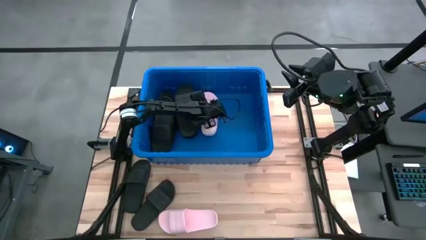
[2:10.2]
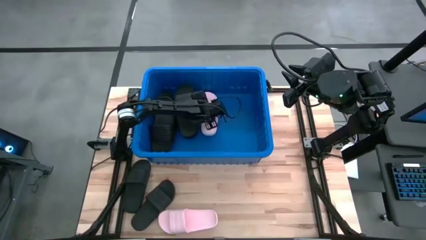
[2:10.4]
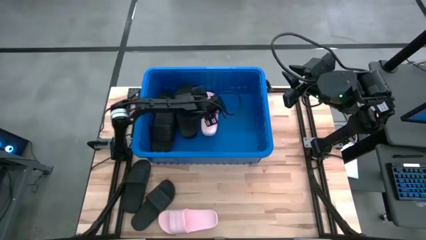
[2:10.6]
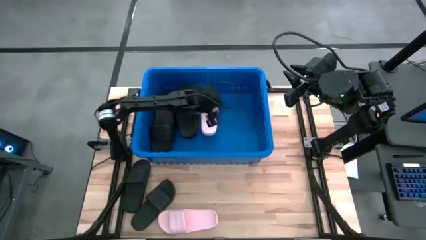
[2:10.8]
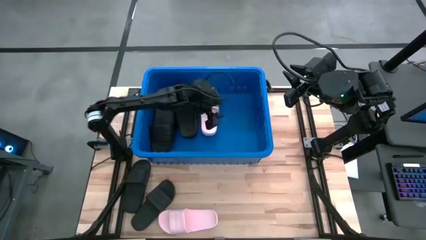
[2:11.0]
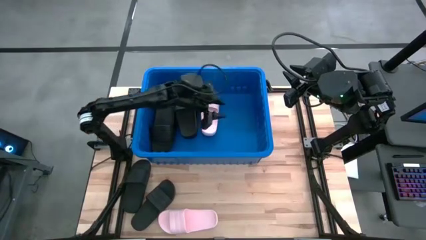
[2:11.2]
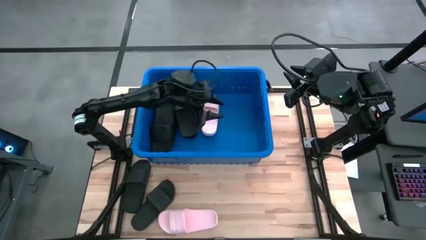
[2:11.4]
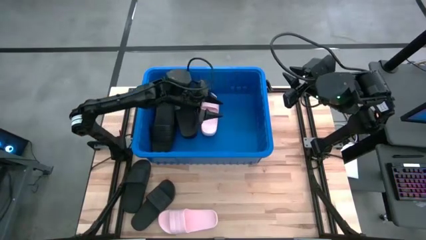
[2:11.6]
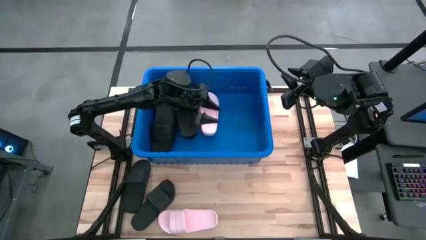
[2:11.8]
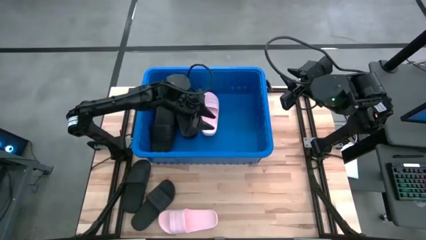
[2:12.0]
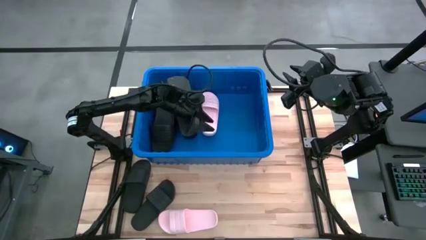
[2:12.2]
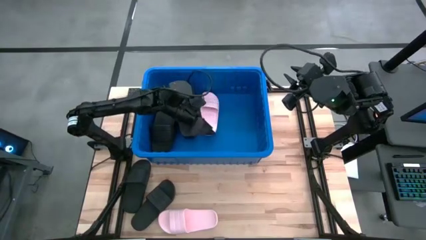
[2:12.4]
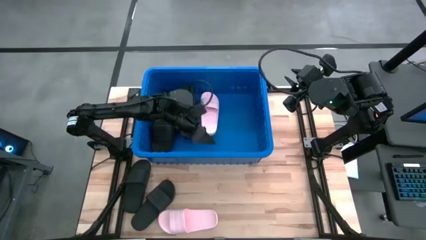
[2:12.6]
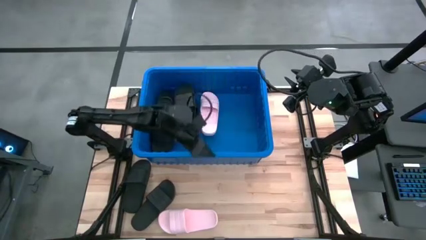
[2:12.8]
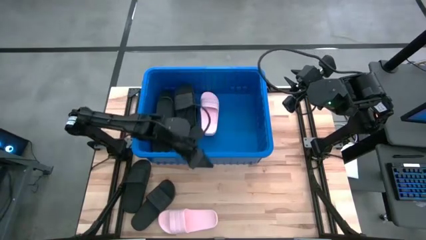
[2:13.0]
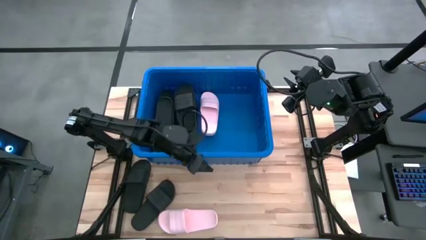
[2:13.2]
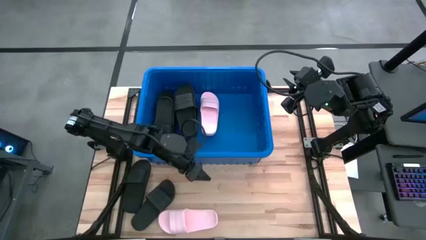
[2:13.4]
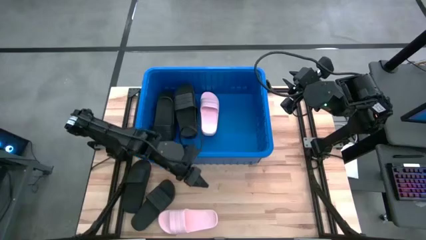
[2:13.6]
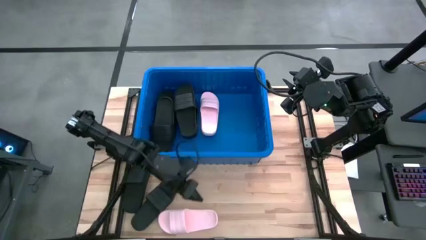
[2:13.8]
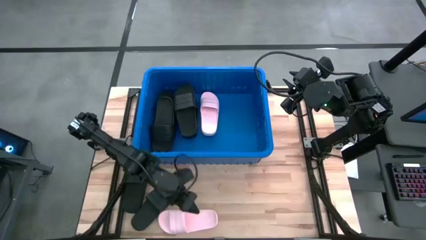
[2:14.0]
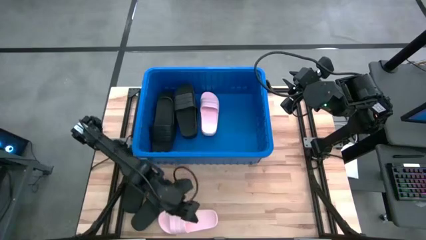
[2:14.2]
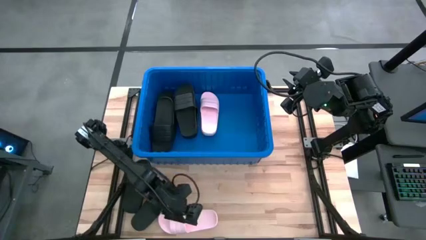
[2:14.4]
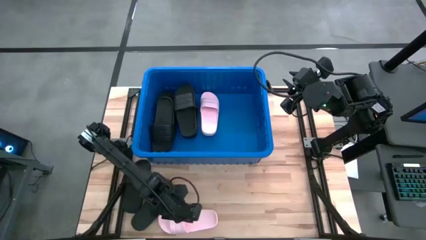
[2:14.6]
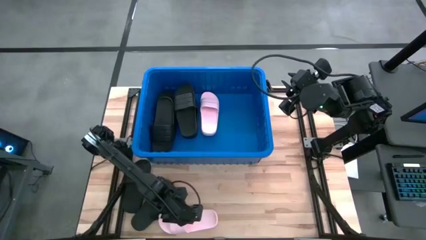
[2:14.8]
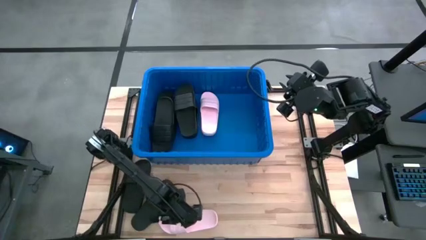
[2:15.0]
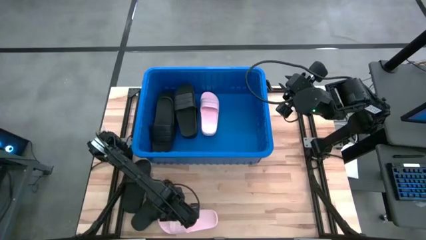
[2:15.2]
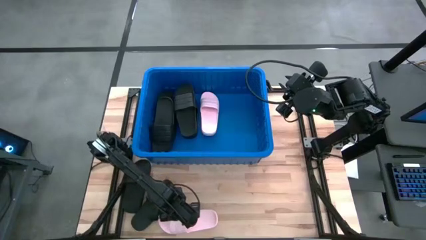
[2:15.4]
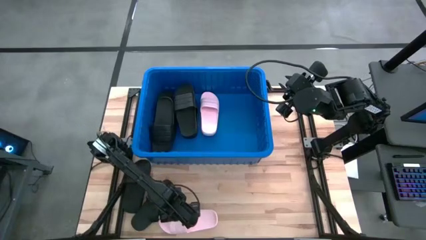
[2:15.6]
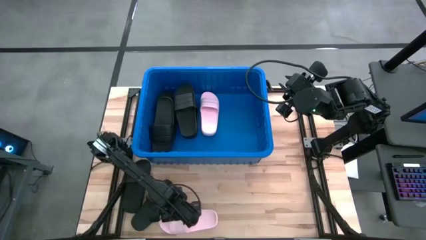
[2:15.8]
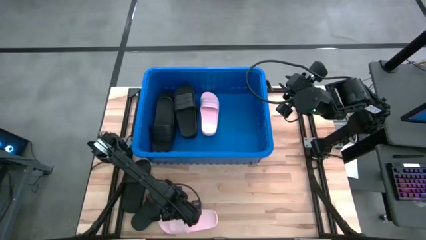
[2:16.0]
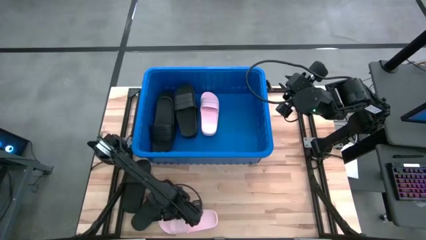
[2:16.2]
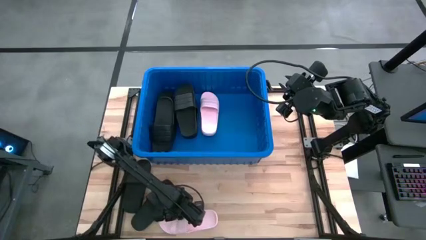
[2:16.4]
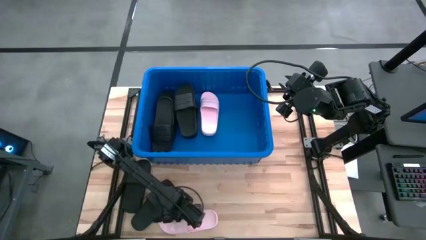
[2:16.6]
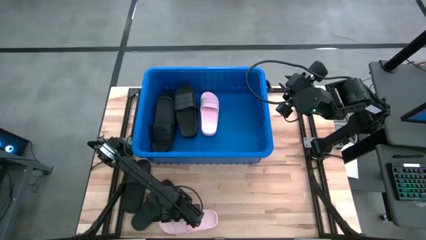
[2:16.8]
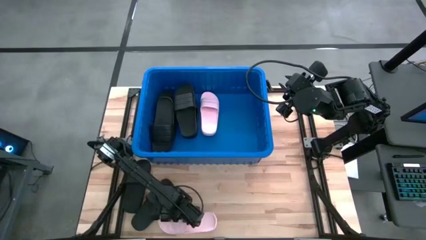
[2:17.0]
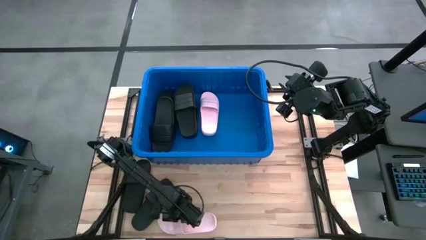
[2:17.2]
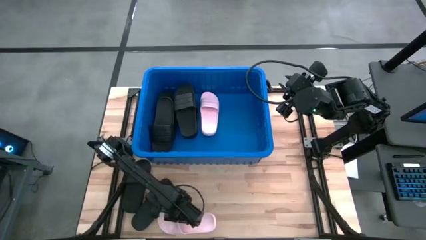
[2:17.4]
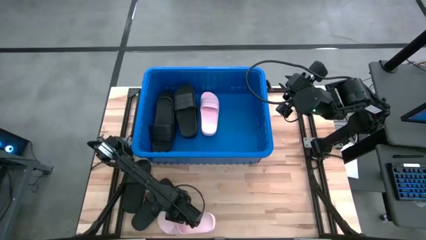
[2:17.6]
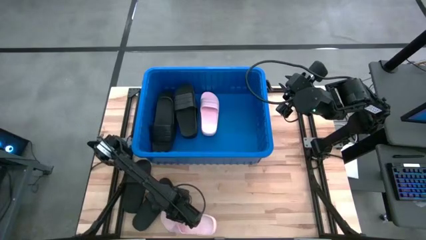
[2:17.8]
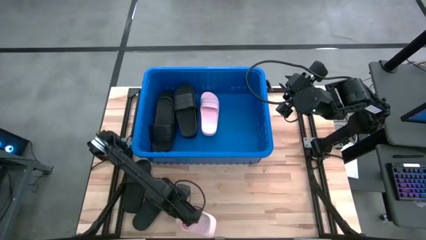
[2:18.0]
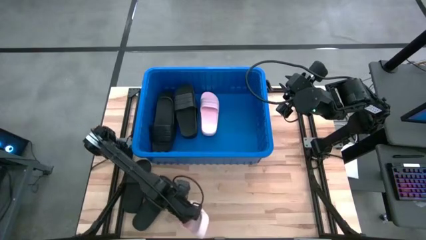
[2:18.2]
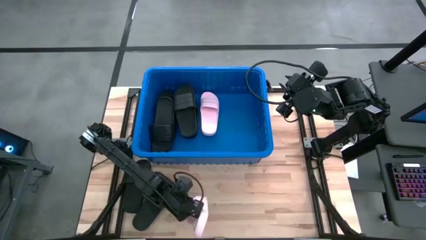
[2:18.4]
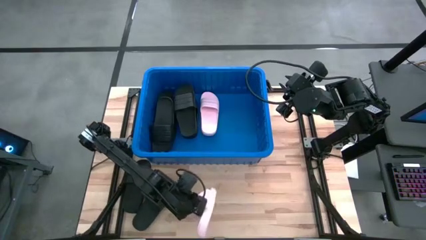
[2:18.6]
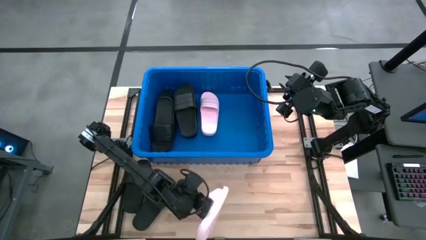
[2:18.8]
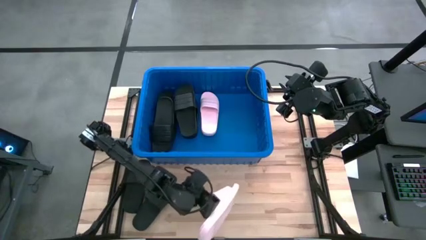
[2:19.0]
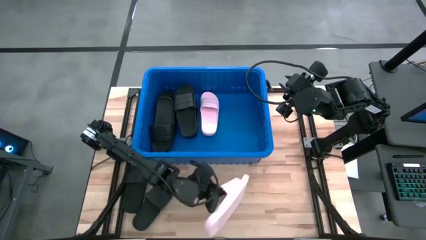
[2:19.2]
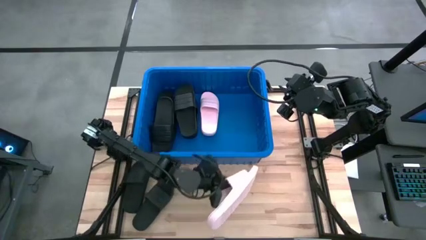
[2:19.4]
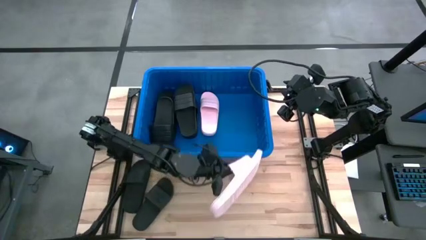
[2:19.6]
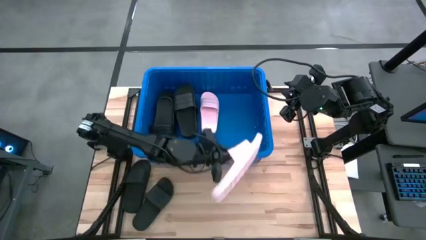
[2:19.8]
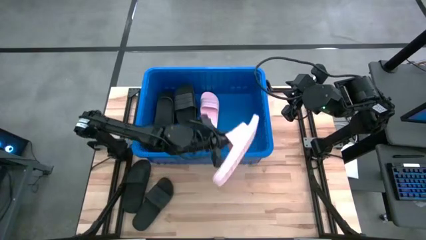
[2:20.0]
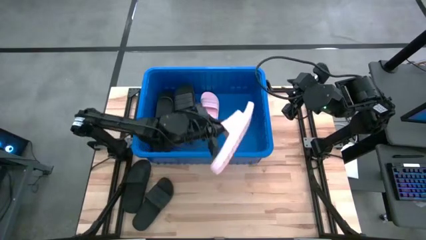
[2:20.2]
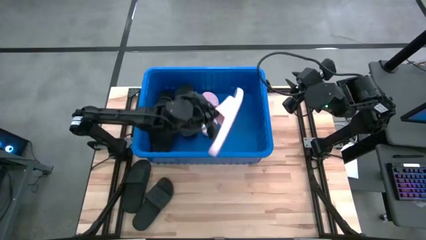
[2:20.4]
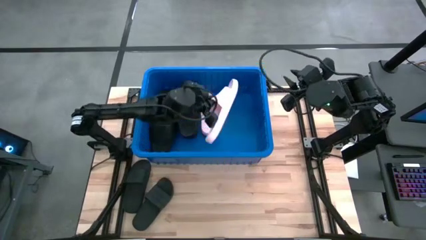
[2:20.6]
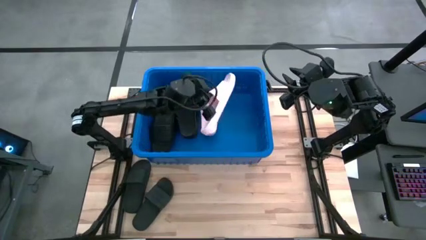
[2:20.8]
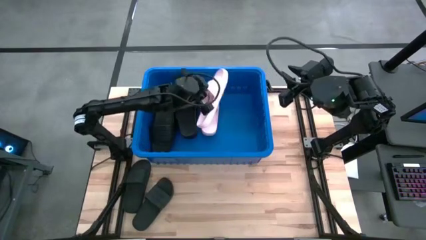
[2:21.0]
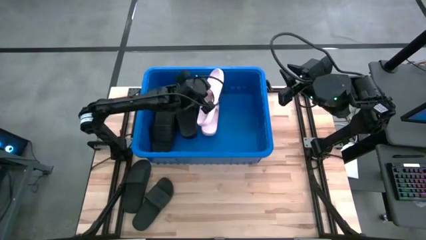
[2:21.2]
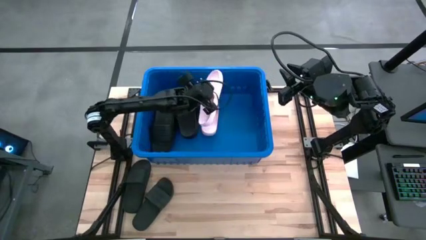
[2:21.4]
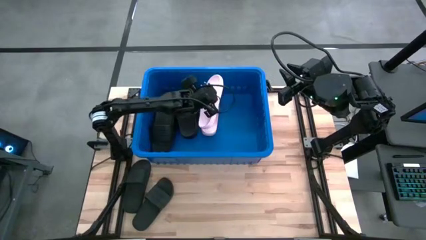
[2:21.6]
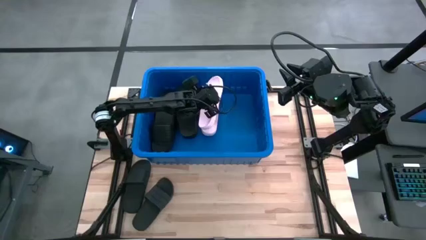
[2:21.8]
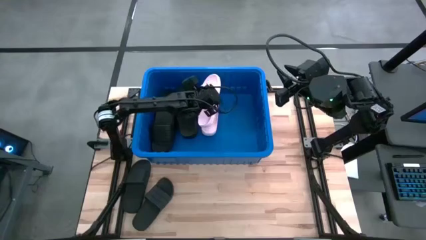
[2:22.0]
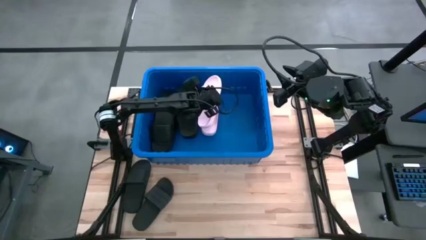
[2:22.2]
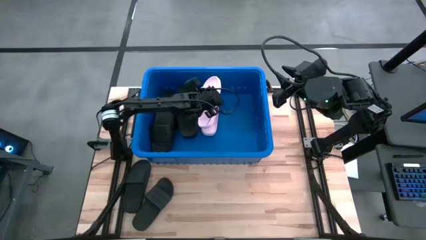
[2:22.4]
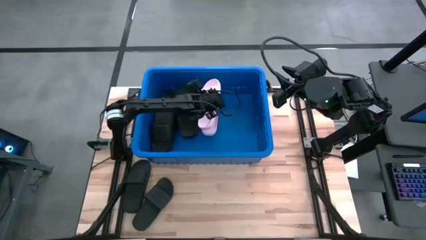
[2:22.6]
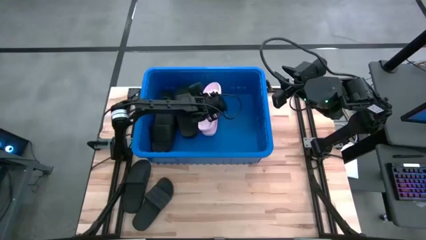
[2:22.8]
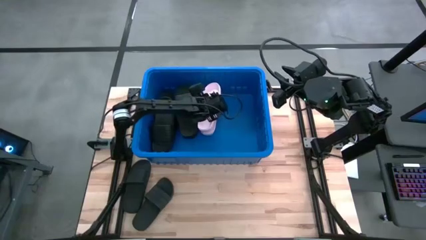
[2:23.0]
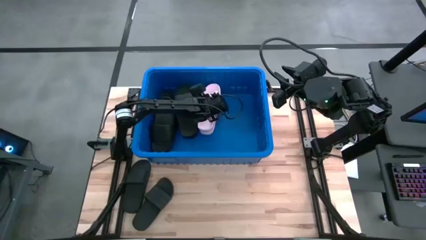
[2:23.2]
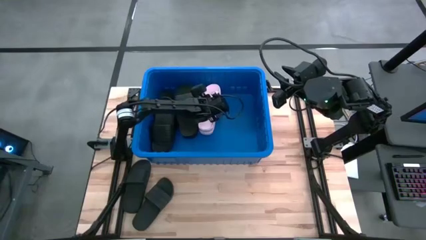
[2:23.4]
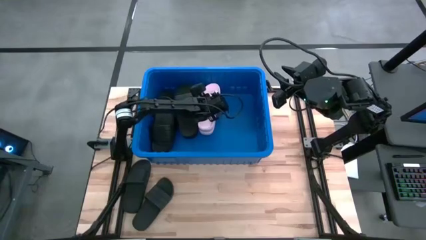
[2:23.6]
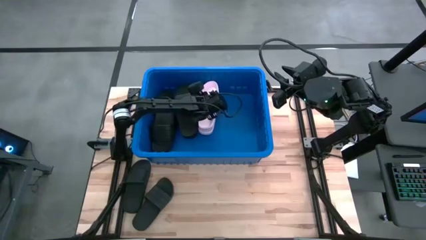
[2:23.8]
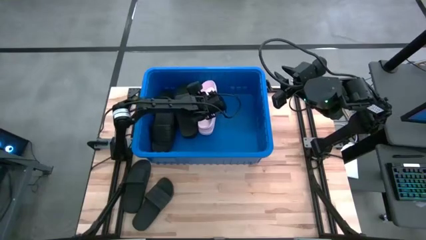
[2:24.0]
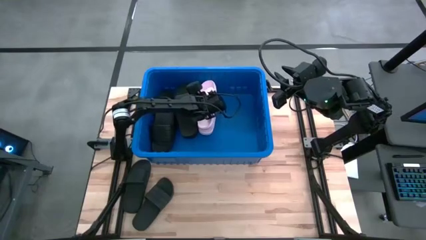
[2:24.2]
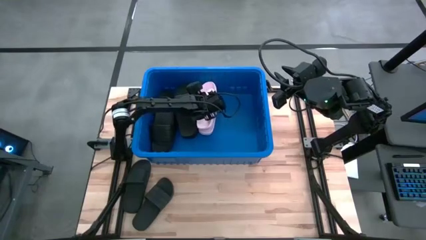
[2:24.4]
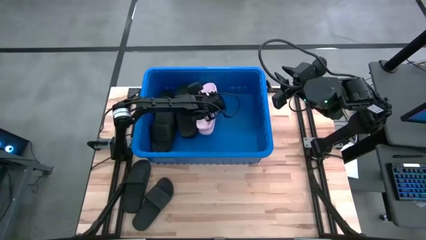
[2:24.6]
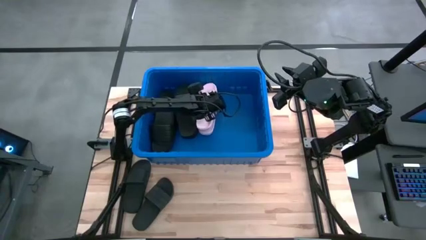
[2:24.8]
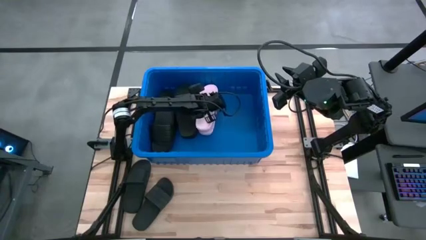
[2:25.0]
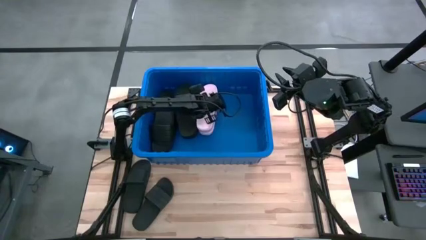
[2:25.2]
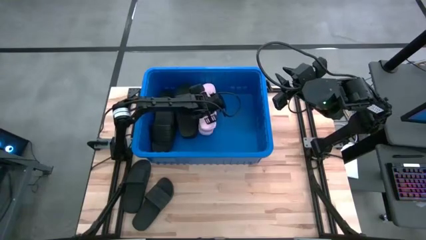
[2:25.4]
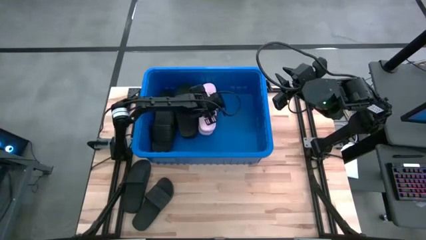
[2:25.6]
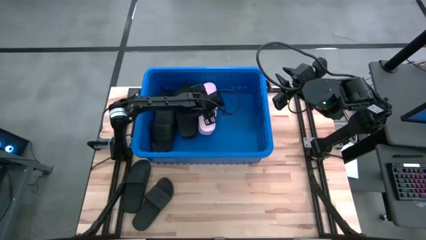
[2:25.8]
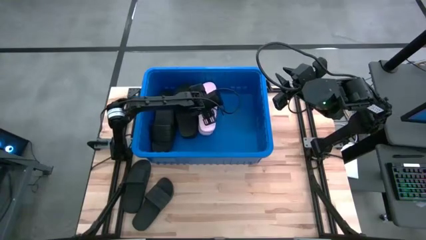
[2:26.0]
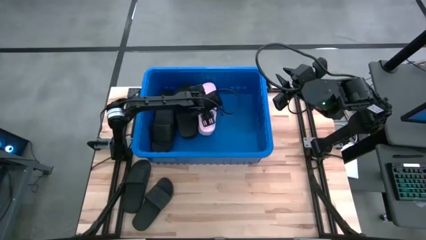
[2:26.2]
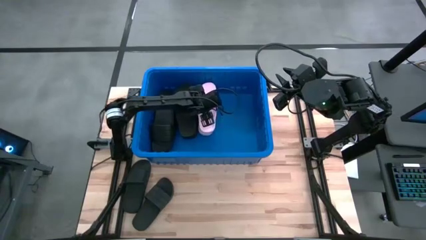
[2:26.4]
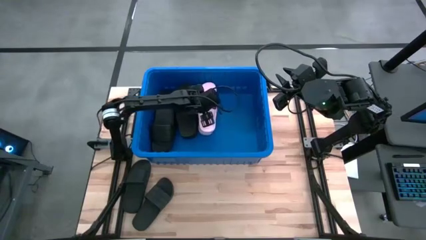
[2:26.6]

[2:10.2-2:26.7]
Task: Pick and place slides into bin
Stack the pink slide on top of the pink slide into the blue container
